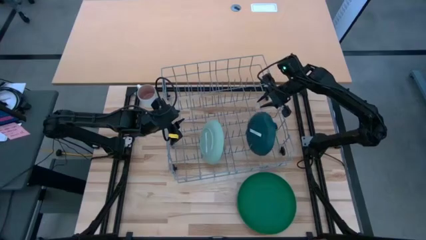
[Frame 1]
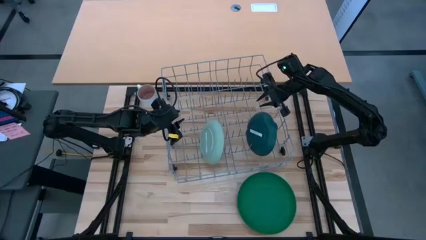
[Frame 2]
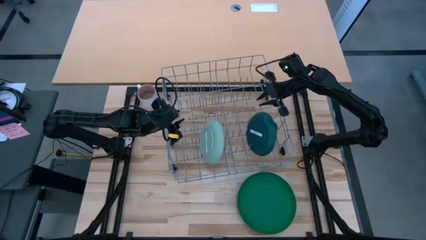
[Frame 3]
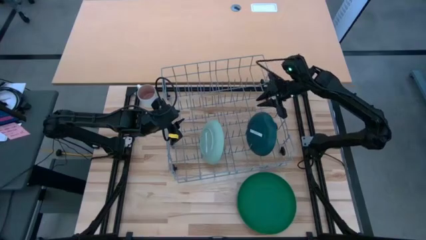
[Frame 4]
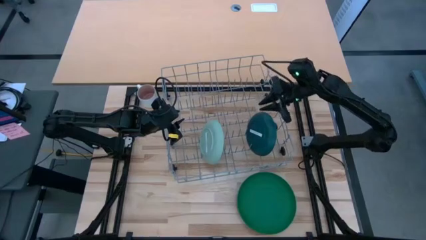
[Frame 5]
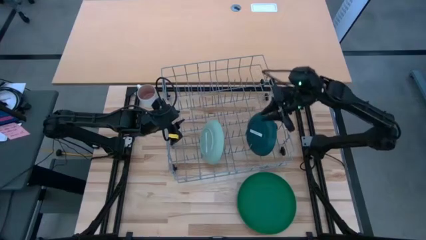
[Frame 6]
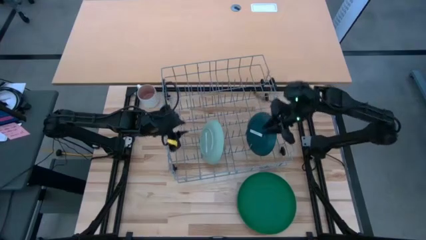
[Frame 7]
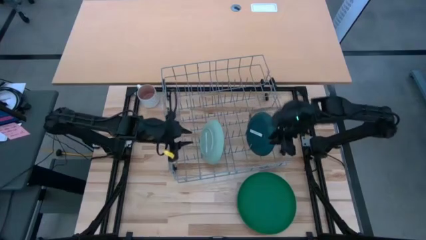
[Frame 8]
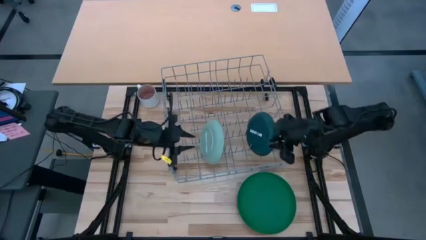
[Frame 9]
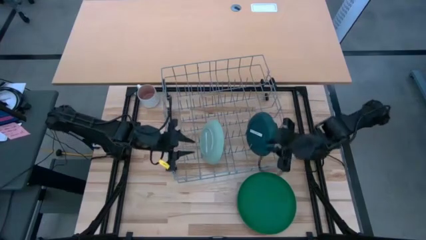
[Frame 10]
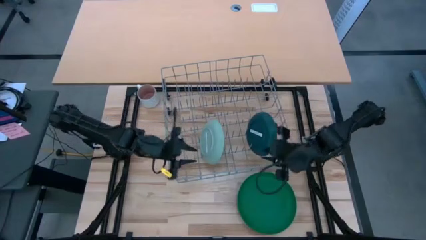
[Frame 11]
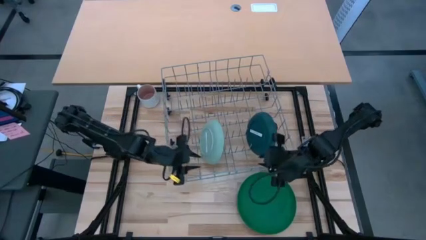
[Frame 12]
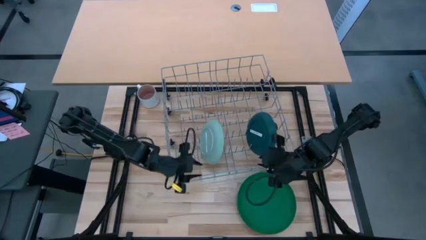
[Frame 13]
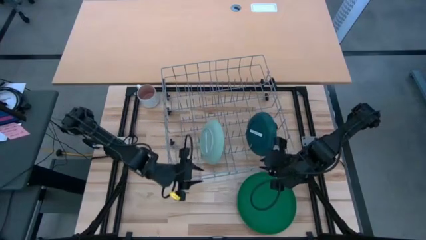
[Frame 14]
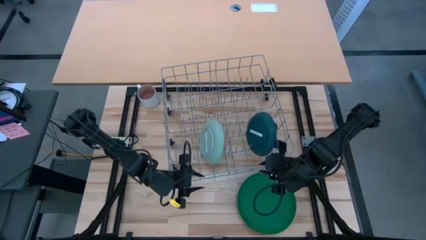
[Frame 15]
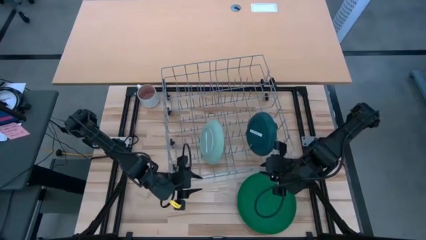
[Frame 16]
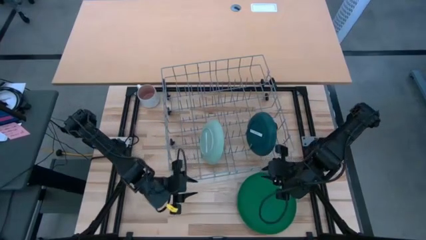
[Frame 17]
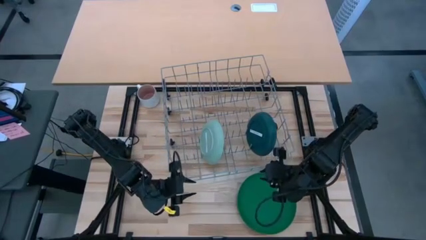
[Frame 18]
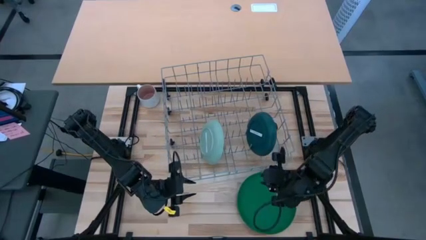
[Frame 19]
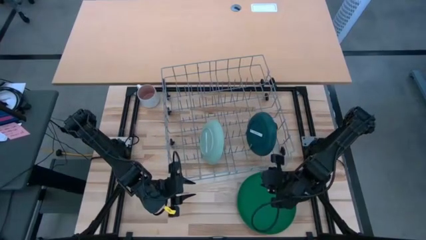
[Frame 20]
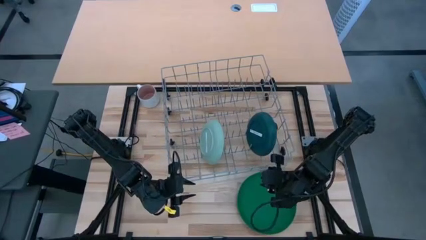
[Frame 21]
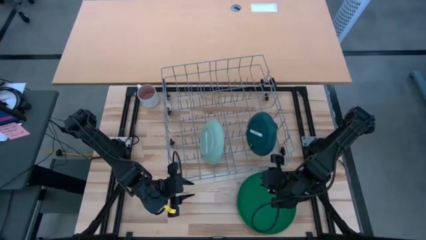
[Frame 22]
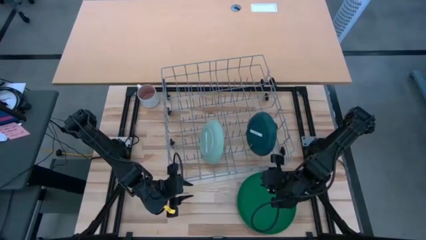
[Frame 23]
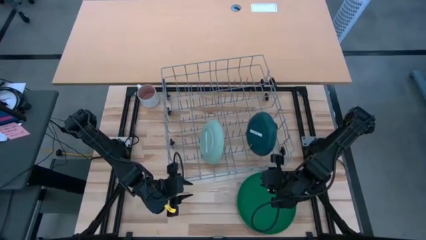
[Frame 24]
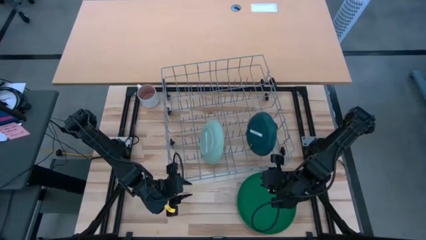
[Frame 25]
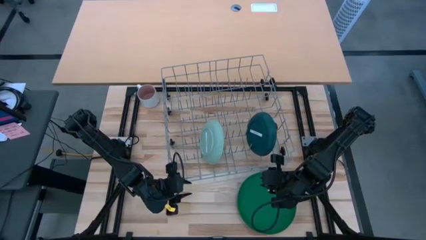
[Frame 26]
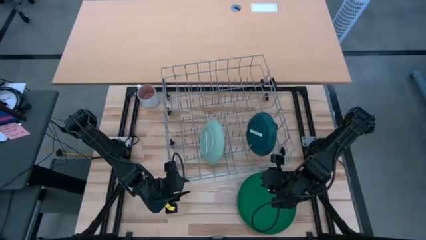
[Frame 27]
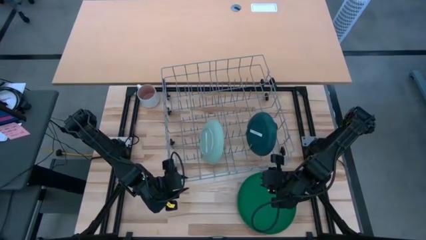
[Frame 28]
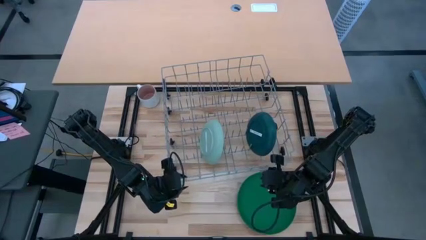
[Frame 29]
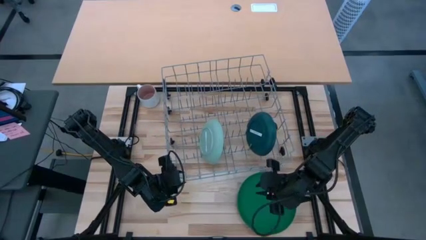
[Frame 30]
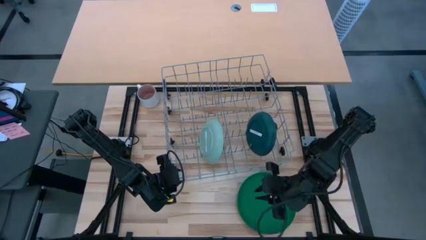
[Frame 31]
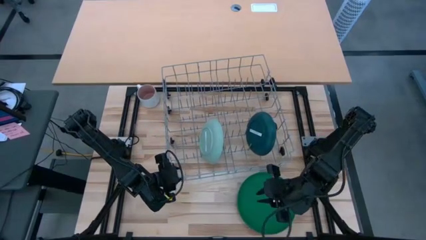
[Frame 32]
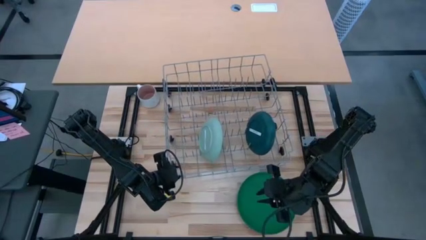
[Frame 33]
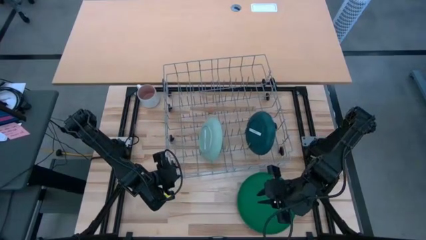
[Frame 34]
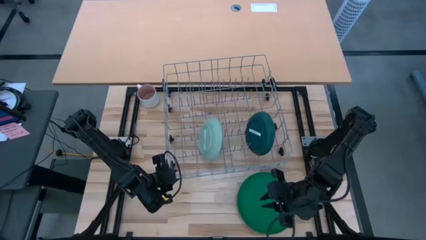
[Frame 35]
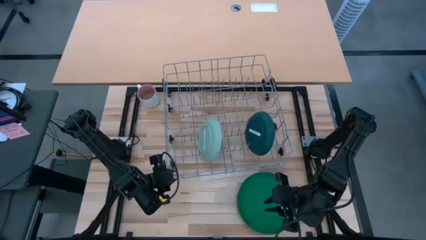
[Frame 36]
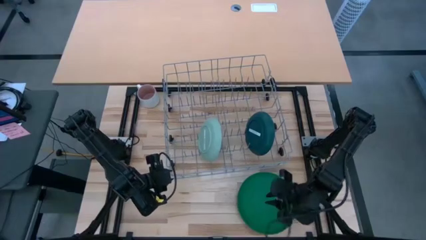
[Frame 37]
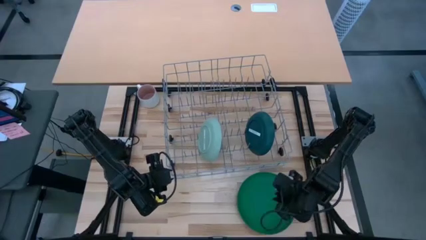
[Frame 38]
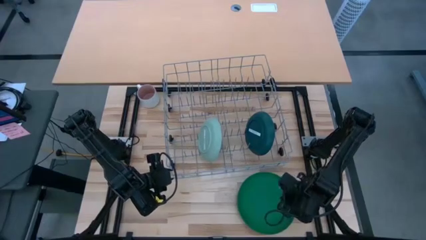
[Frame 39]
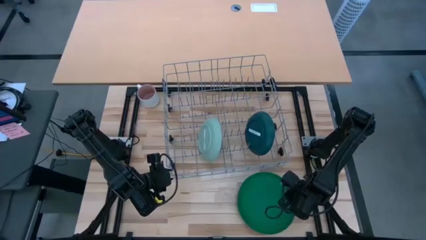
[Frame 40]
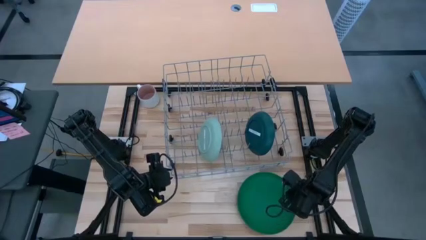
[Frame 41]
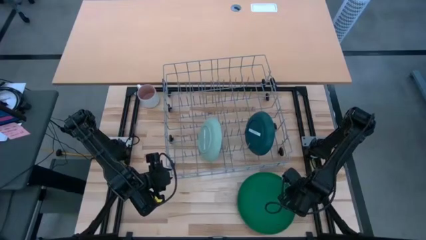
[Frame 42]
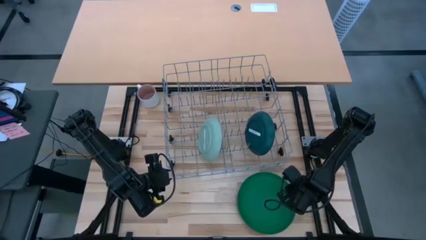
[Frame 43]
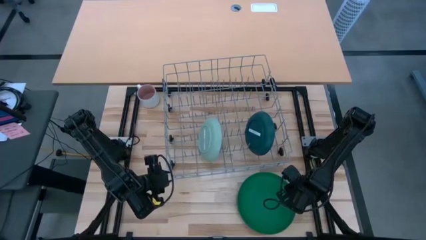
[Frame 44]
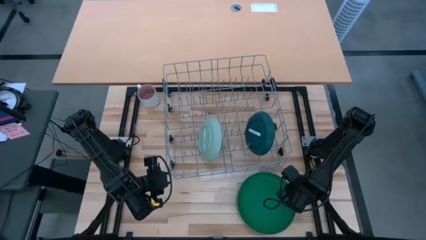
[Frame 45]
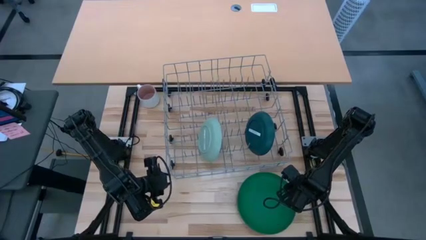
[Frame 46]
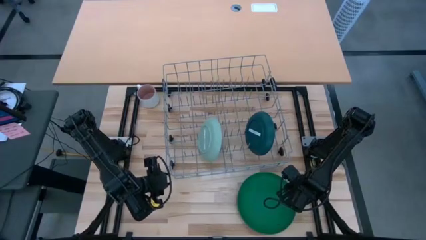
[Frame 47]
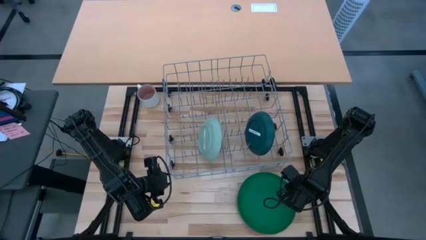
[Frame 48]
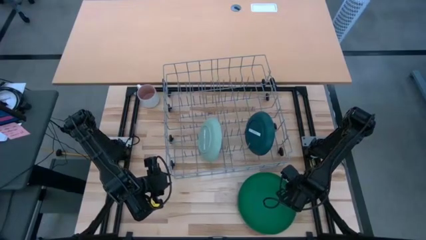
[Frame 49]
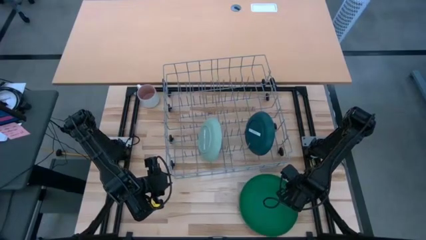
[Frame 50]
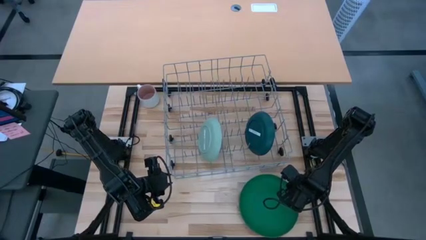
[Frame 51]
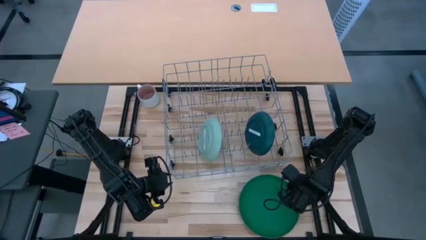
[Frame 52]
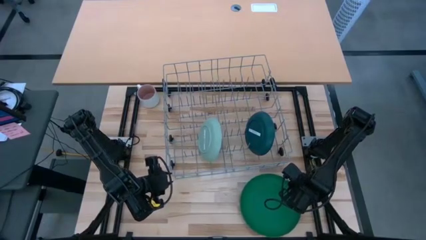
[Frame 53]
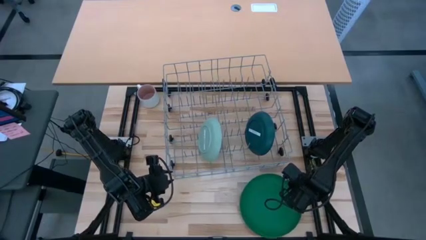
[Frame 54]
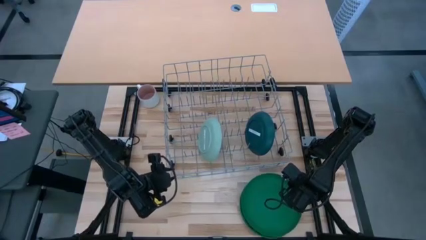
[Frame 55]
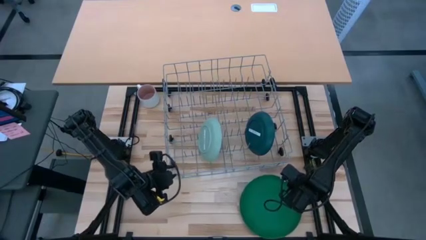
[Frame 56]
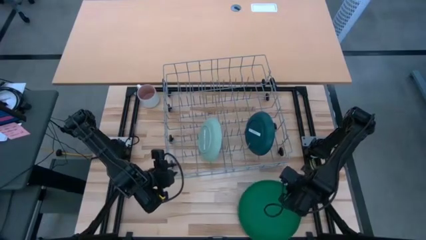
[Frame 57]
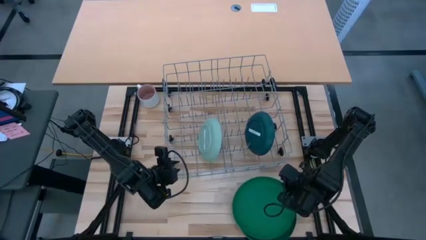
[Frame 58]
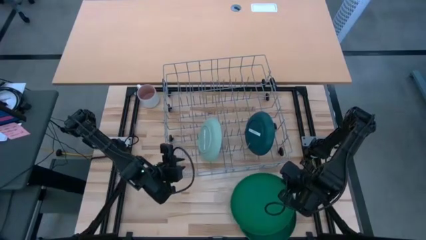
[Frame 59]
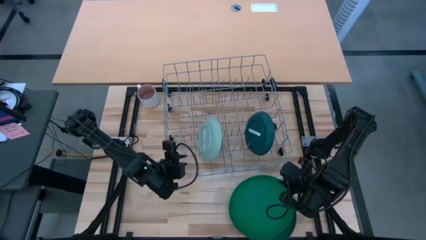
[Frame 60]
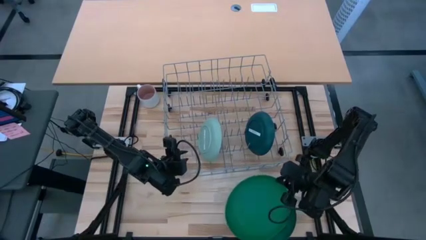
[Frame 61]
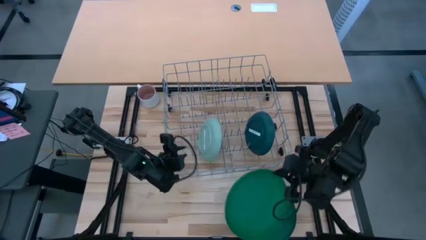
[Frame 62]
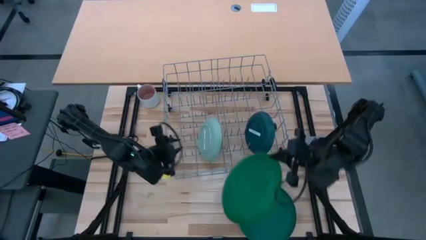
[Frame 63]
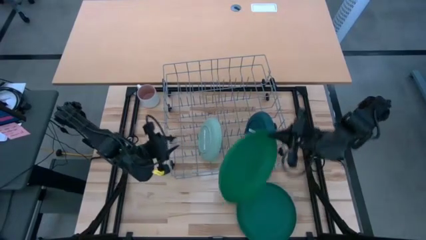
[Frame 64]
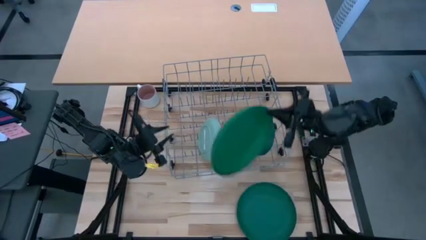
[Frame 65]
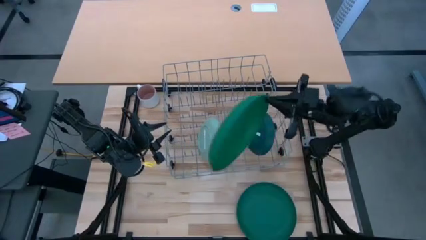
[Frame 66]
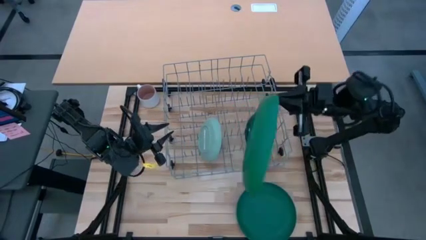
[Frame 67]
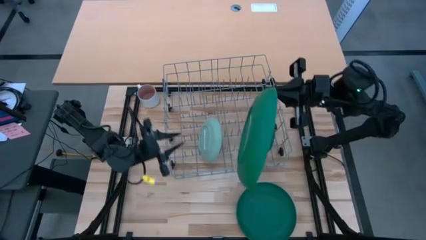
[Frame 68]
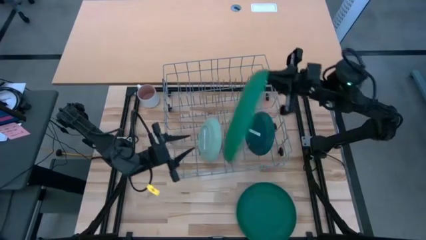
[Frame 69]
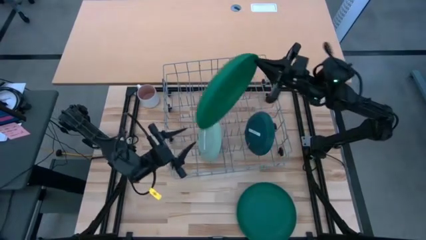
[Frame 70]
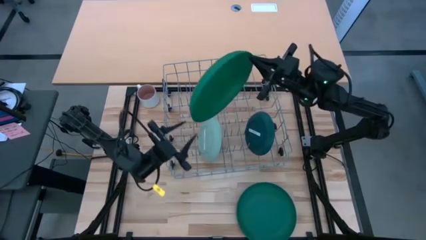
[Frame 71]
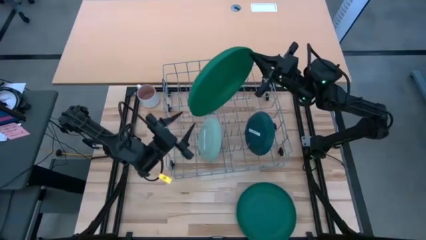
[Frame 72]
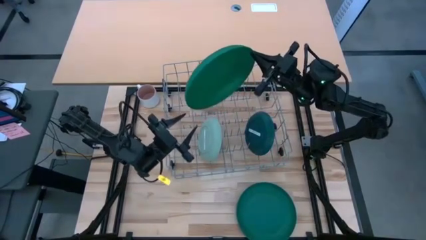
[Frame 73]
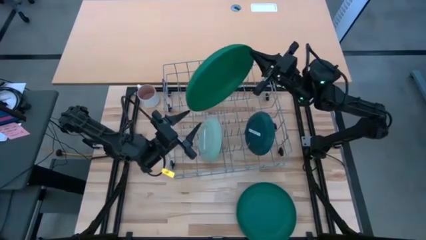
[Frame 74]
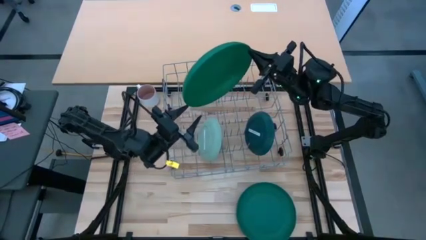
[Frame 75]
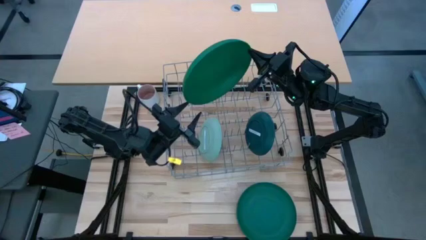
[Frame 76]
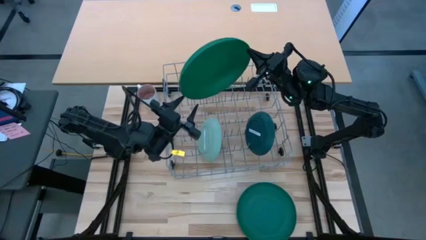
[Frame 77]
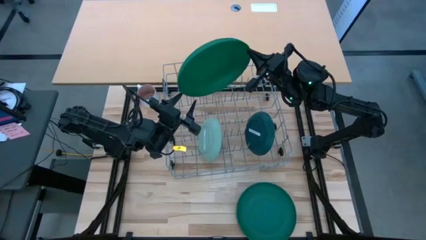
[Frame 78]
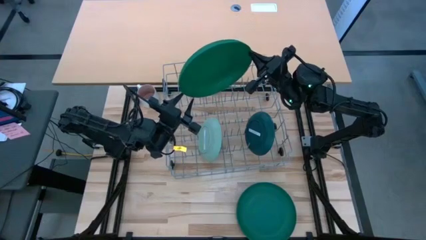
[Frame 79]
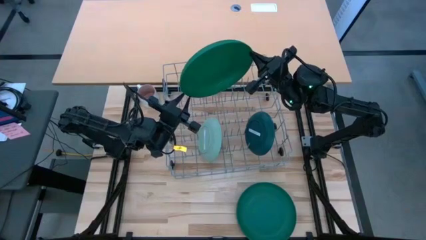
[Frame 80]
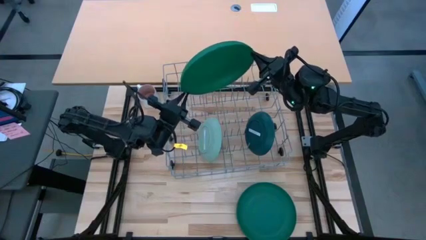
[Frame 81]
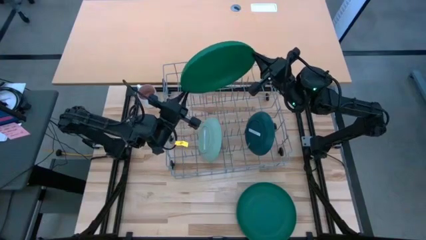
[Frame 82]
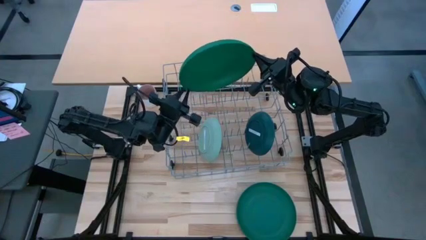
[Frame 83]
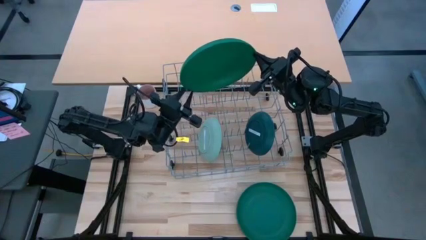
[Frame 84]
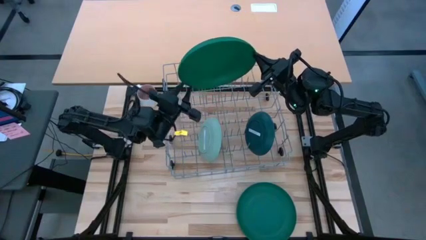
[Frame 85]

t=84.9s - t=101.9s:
Task: Sort dishes
Put a green plate in the dish rack
